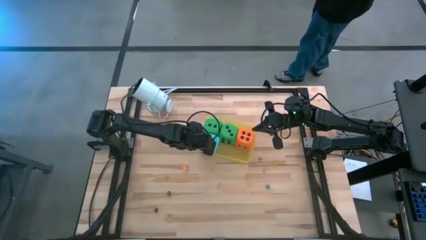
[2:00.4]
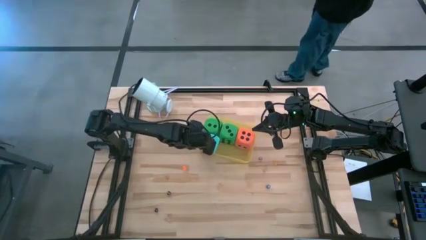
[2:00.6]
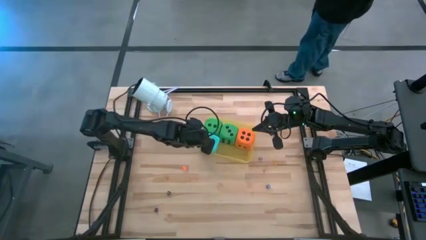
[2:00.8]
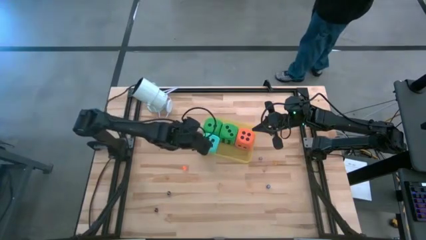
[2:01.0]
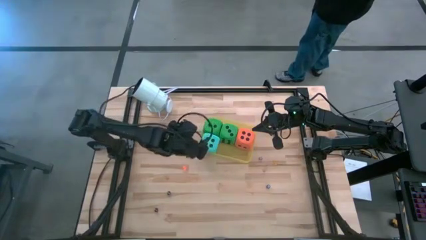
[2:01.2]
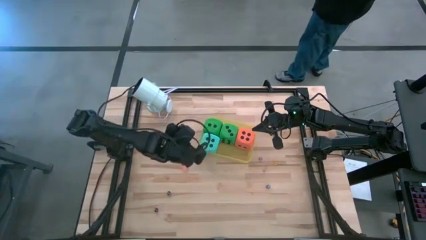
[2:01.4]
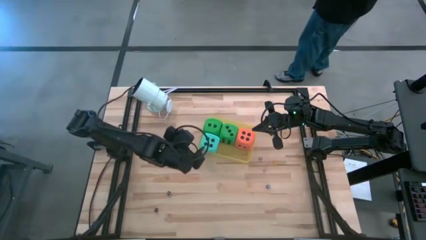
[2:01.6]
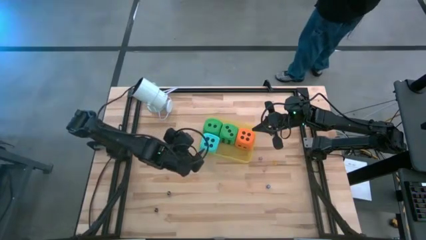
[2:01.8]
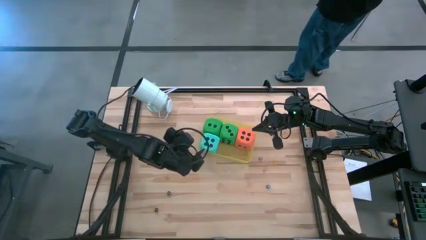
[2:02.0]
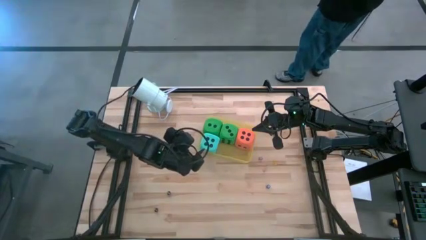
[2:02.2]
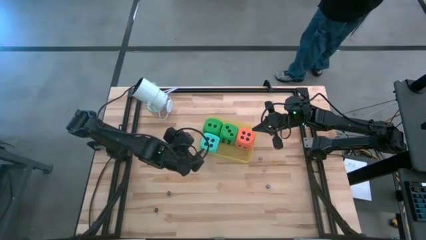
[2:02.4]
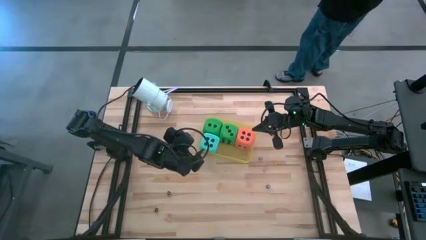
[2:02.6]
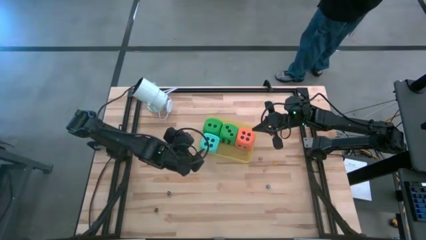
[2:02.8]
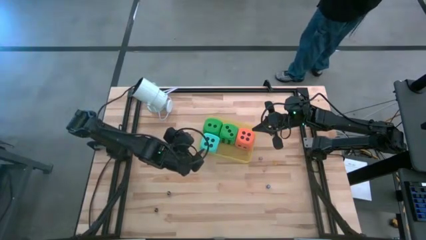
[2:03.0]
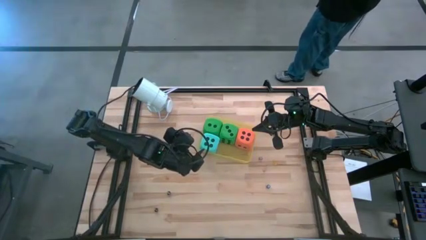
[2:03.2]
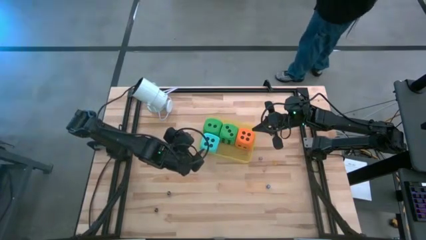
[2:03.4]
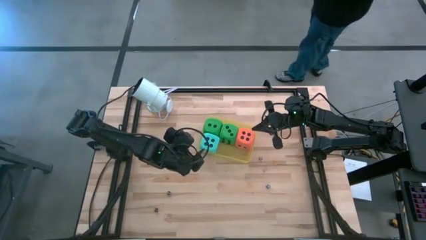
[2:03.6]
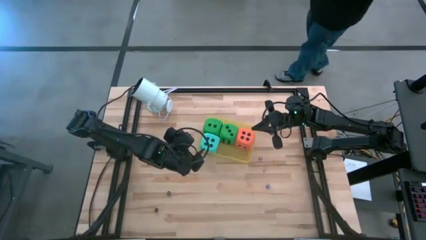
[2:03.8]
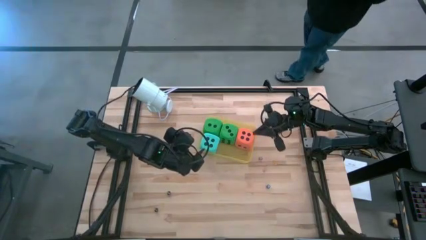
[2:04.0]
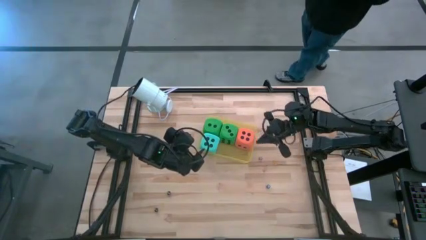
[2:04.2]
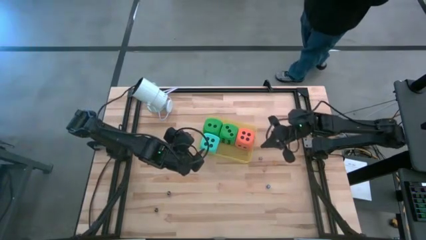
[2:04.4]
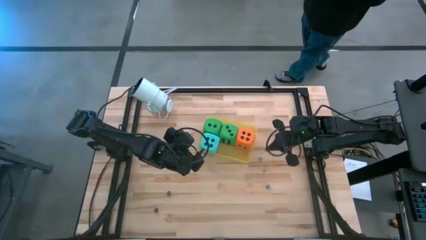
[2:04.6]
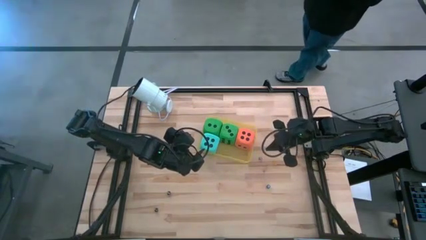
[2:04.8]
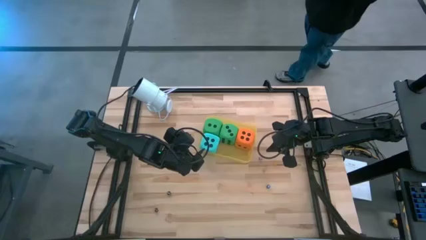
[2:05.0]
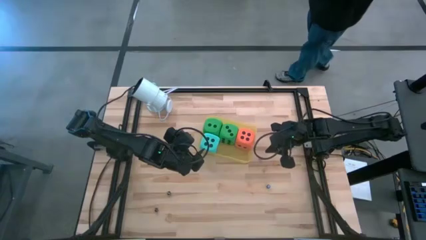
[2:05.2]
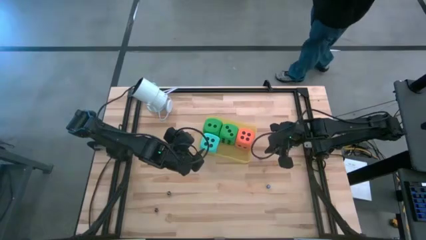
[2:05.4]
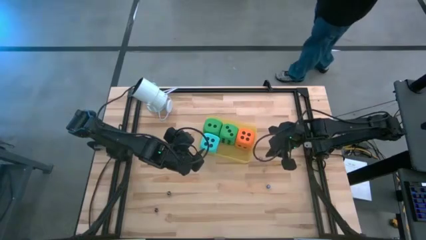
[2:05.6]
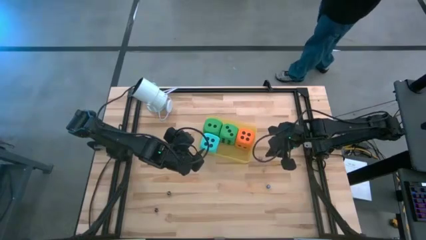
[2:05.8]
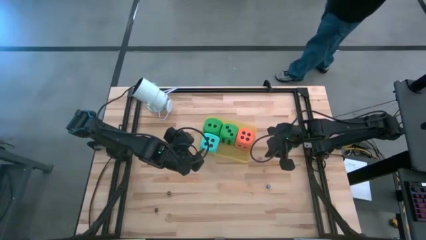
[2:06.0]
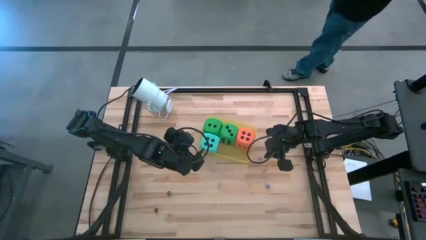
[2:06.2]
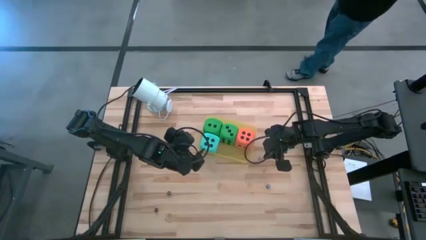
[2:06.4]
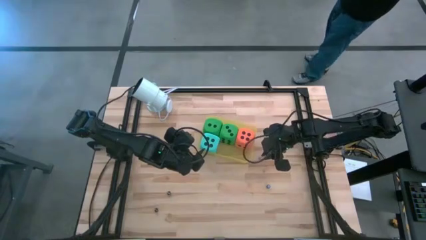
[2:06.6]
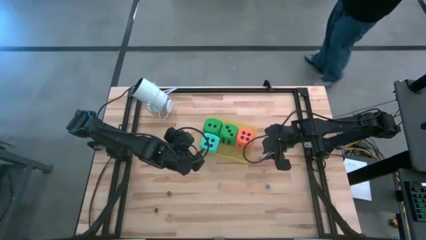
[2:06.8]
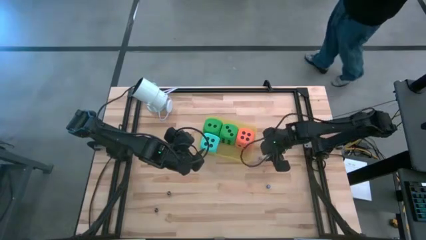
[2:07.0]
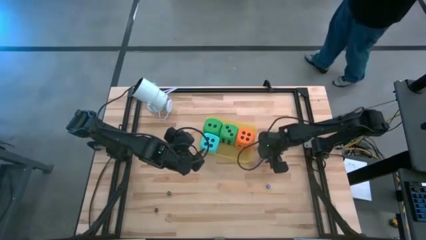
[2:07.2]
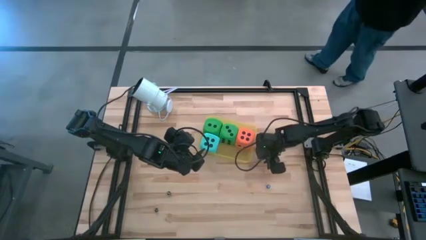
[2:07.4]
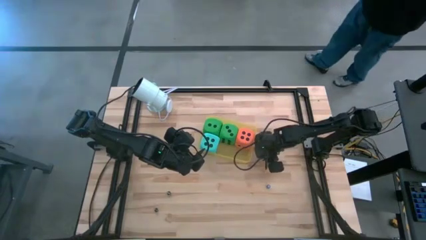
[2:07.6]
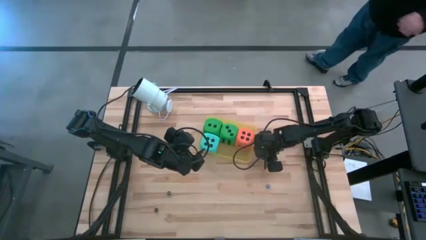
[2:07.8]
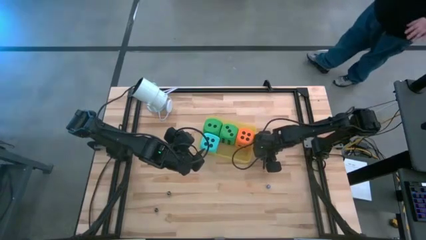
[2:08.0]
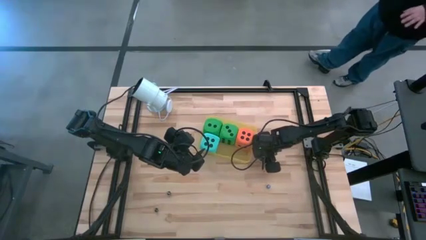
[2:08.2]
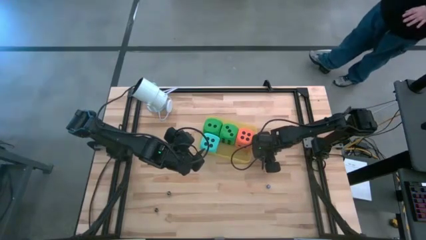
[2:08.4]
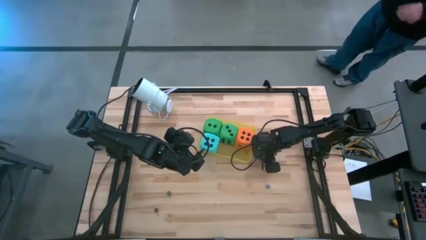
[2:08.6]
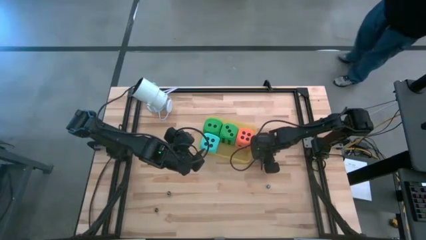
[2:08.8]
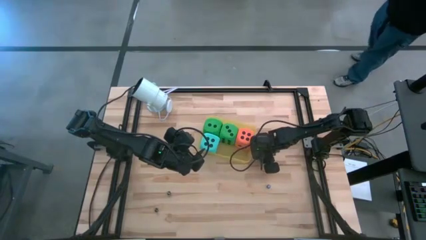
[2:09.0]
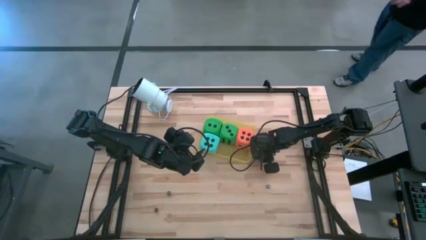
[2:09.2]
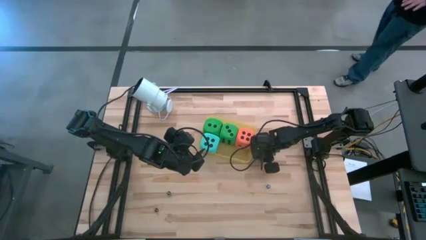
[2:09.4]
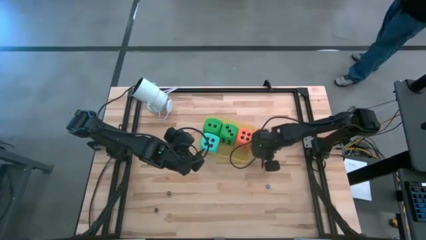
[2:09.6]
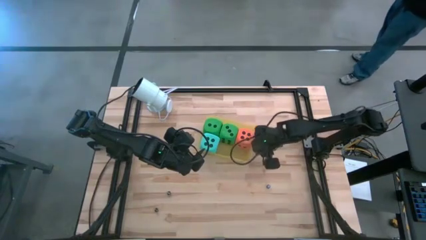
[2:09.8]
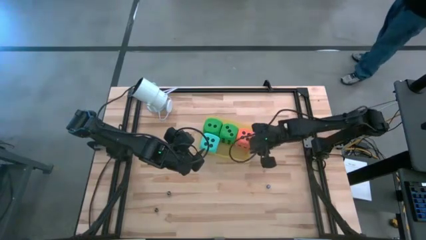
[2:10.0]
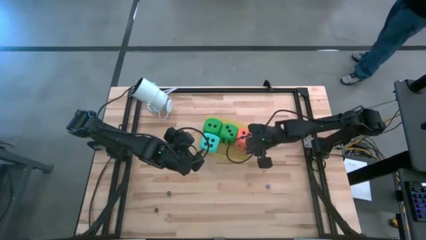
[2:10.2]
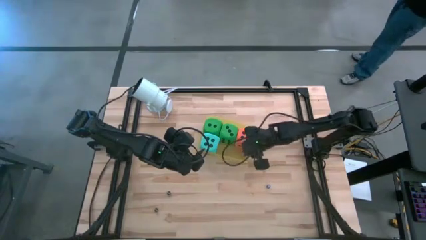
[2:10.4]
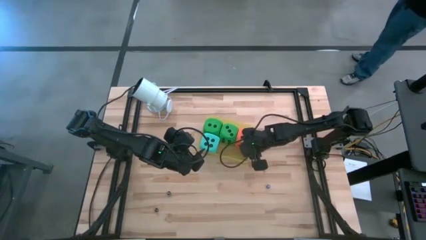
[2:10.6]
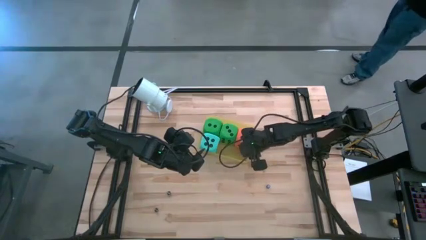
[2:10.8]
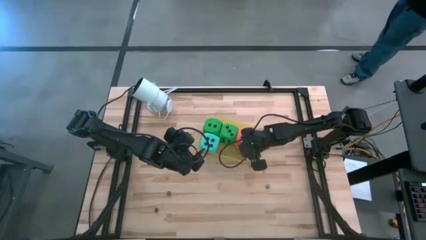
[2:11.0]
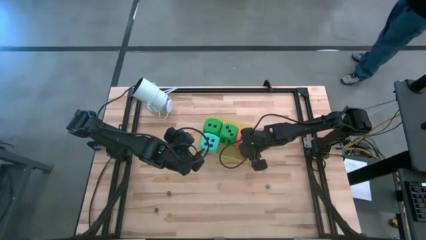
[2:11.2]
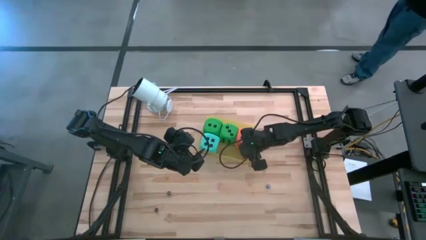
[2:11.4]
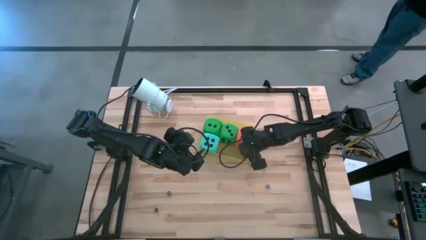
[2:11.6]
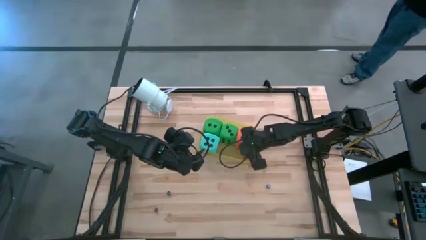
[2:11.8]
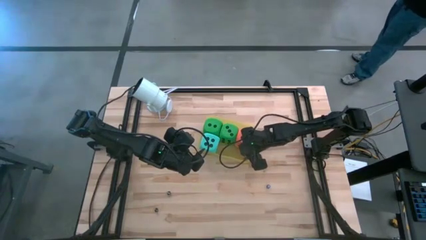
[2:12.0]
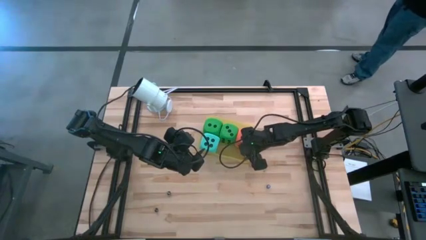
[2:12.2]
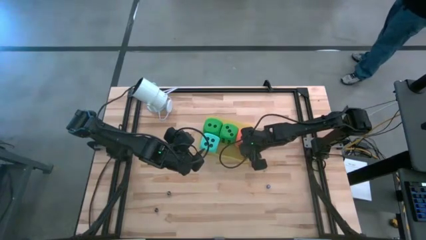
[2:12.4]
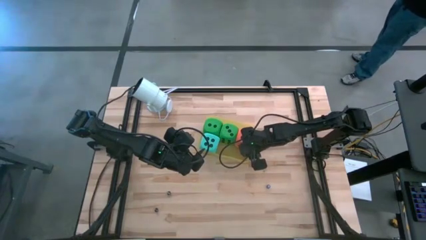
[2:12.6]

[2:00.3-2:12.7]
Task: Pick & Place Dice
Put the small purple dice into the yellow bin

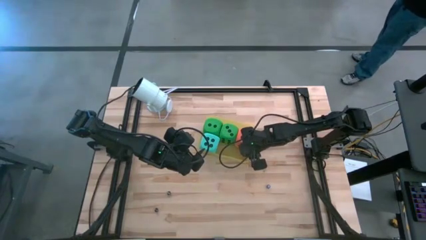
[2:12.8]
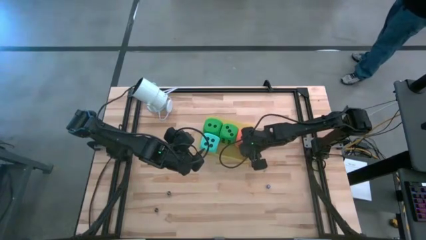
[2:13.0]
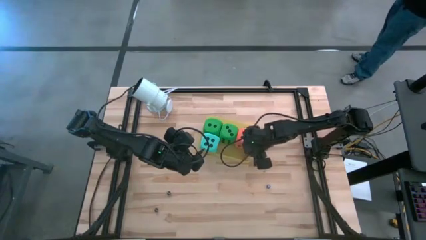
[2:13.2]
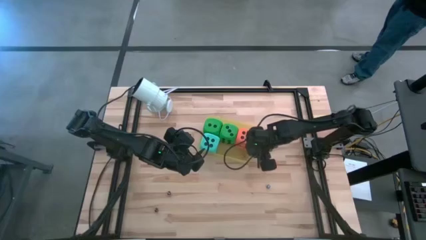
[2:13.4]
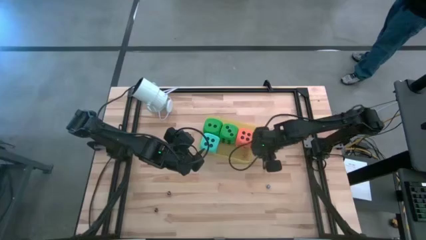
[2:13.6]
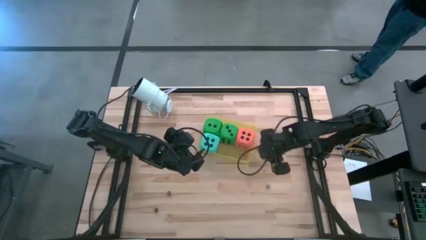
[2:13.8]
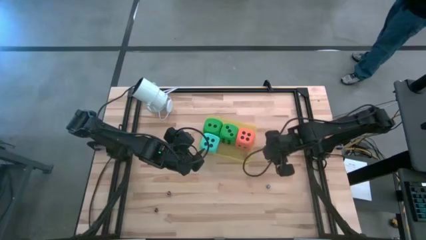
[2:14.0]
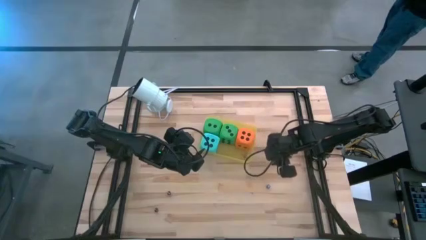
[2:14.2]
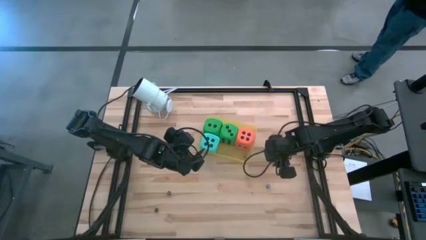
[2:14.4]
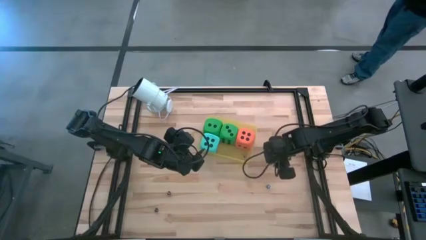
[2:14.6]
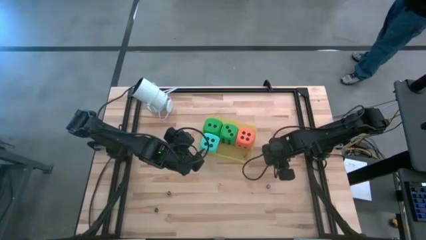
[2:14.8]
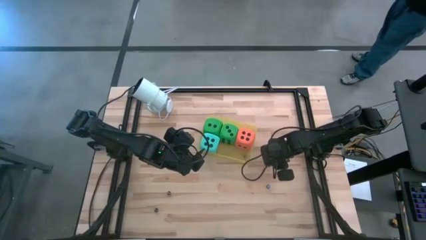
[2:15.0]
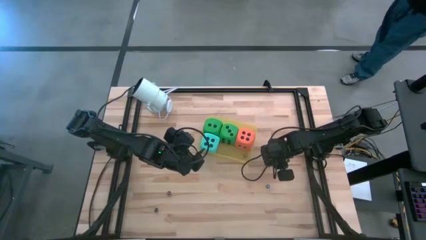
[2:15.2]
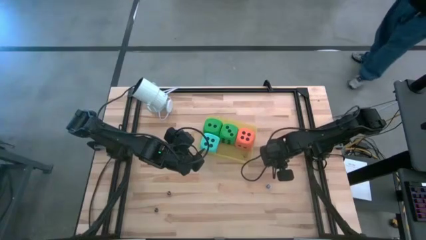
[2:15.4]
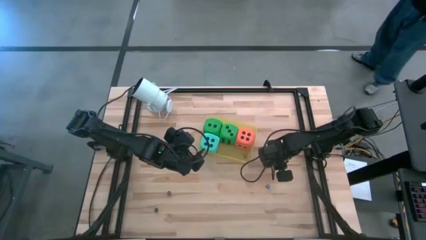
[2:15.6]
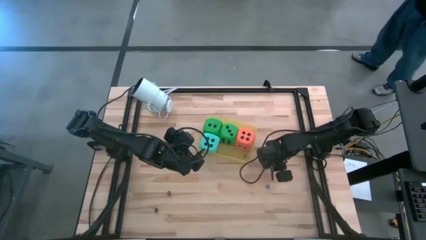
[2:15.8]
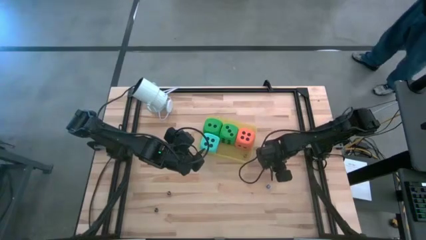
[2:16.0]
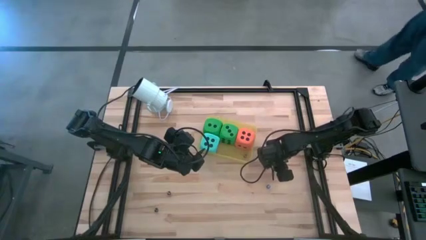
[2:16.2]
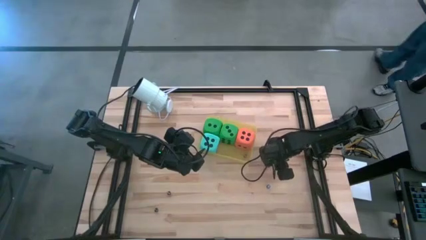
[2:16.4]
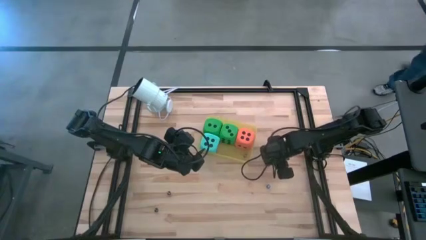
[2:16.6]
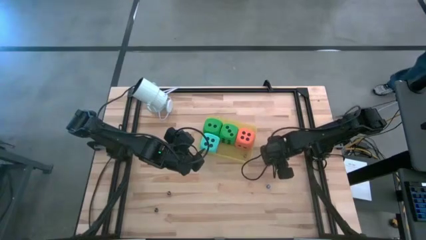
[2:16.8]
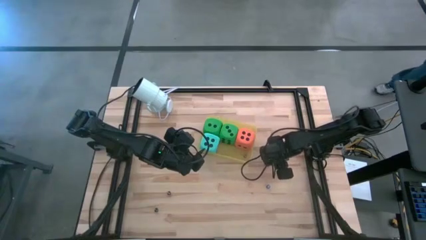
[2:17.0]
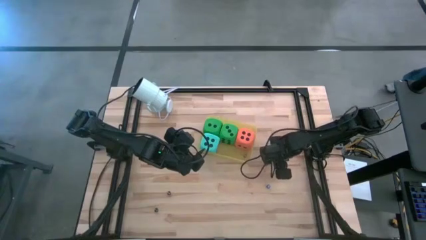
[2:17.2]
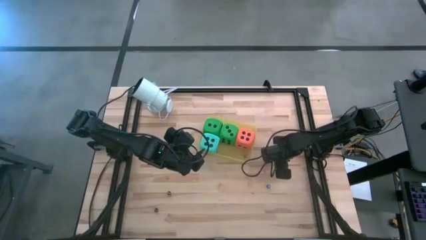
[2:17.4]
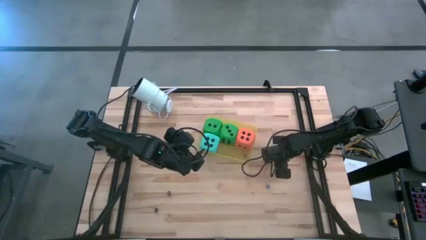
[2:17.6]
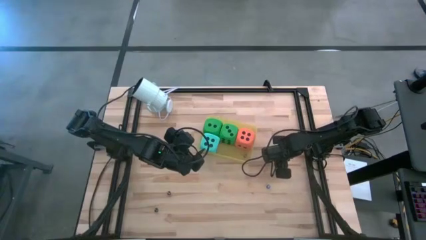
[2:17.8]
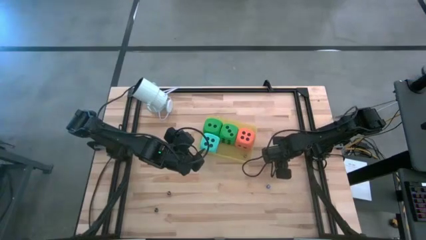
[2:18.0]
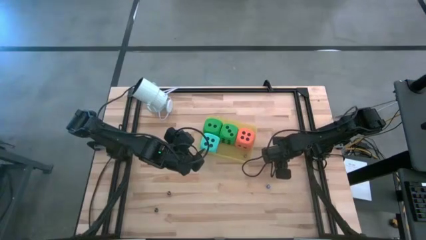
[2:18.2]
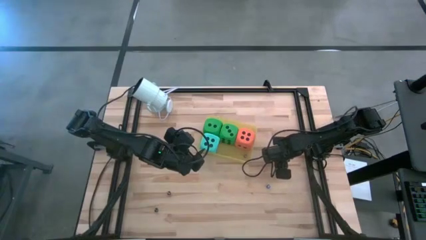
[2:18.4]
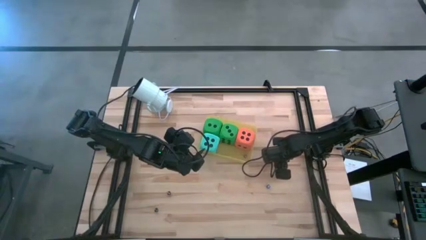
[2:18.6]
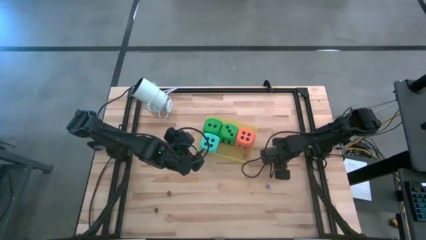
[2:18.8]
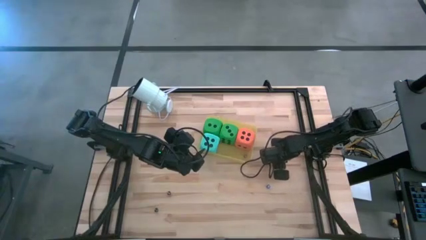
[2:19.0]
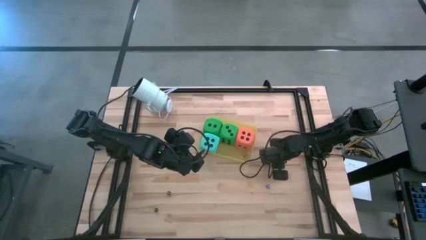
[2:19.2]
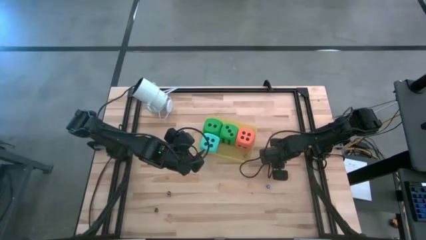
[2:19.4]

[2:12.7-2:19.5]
Put the small yellow dice into the yellow bin
